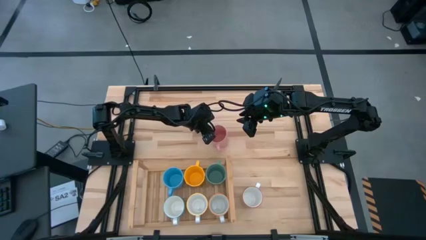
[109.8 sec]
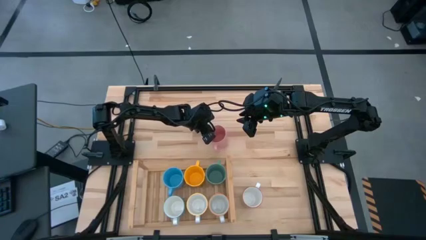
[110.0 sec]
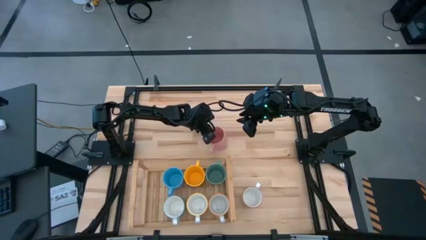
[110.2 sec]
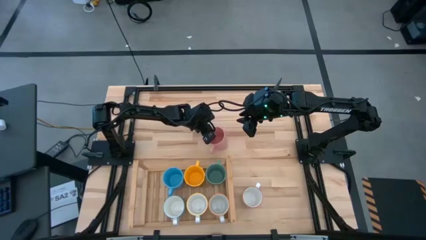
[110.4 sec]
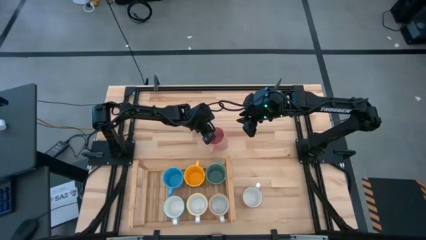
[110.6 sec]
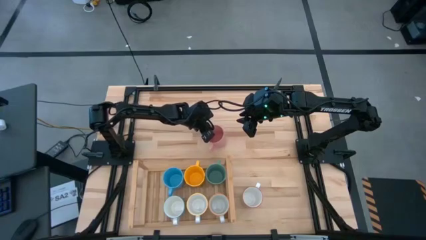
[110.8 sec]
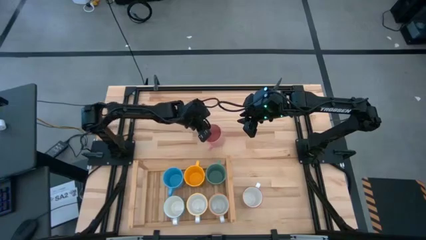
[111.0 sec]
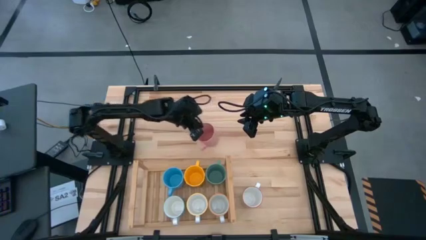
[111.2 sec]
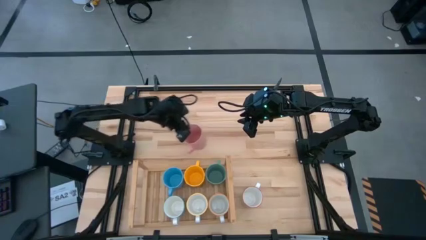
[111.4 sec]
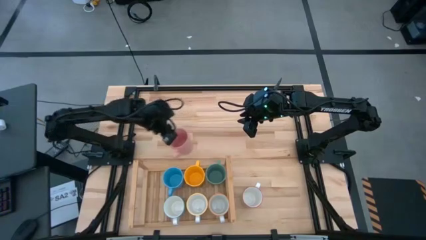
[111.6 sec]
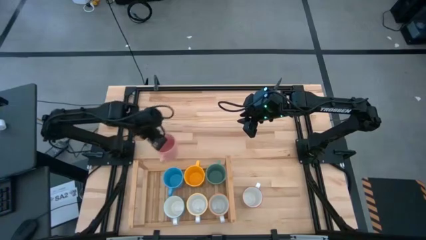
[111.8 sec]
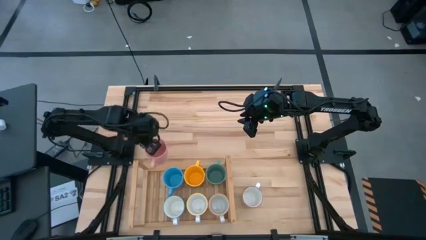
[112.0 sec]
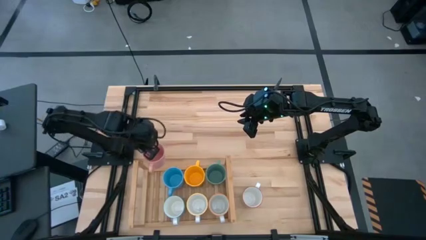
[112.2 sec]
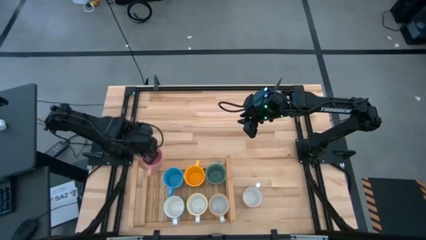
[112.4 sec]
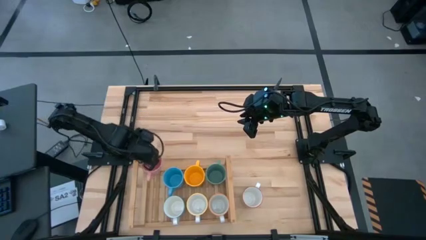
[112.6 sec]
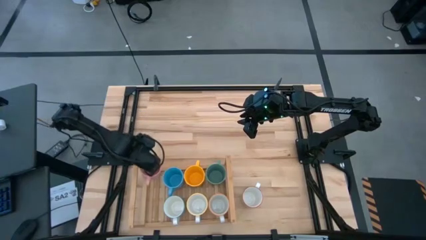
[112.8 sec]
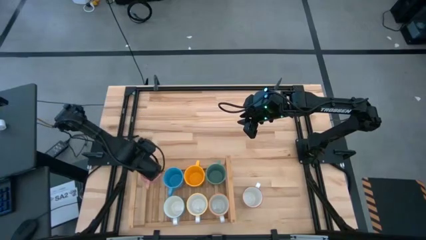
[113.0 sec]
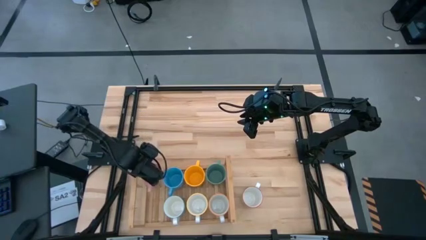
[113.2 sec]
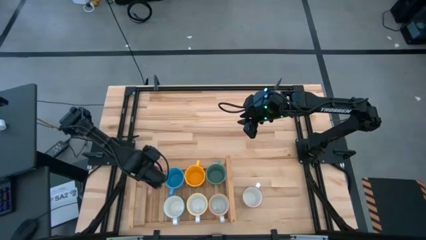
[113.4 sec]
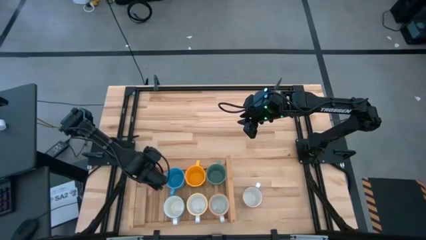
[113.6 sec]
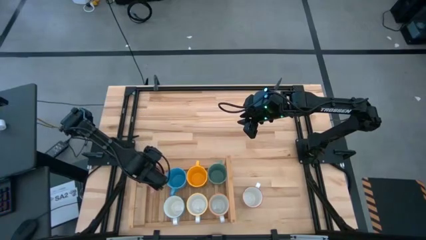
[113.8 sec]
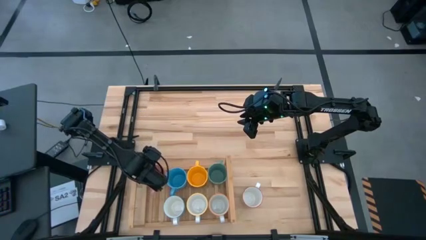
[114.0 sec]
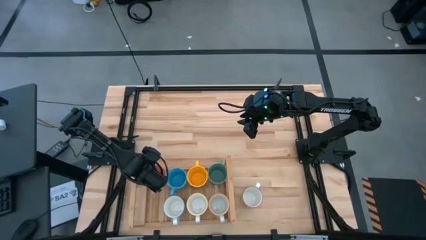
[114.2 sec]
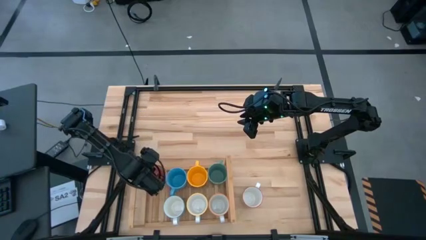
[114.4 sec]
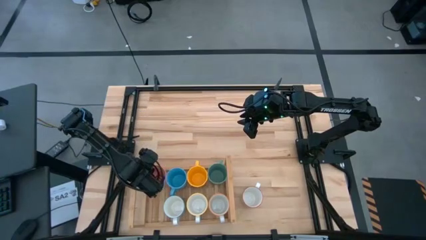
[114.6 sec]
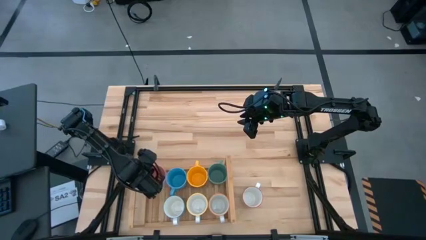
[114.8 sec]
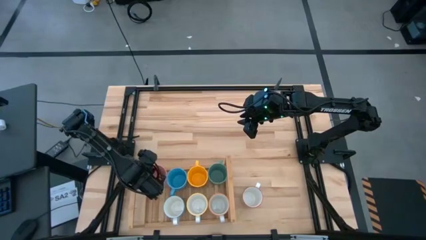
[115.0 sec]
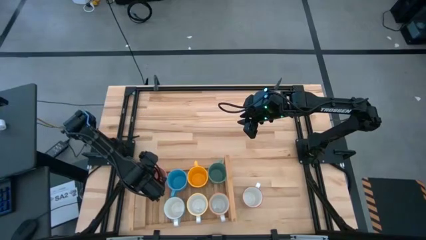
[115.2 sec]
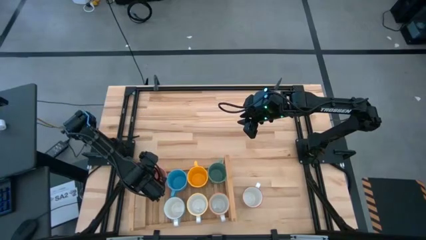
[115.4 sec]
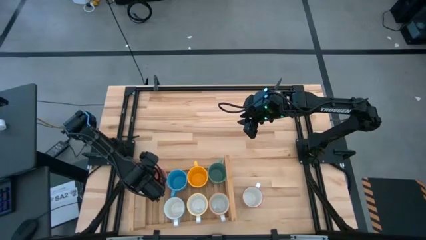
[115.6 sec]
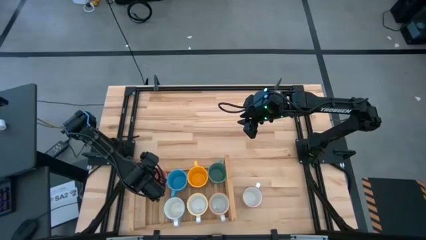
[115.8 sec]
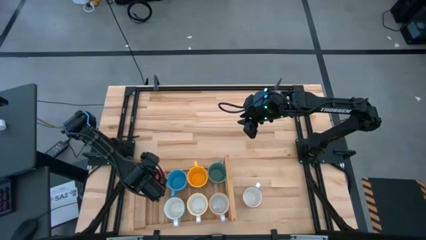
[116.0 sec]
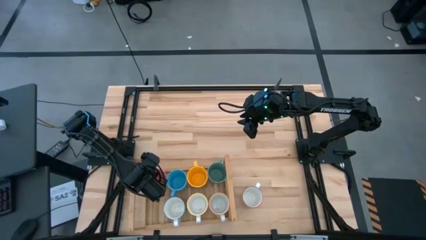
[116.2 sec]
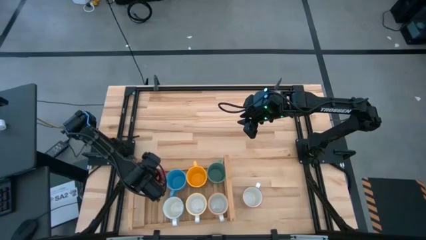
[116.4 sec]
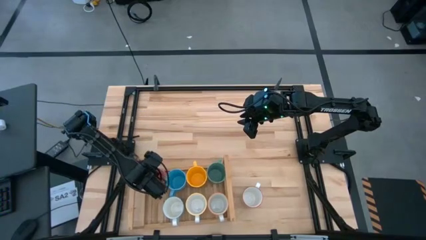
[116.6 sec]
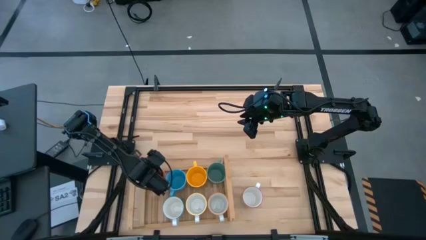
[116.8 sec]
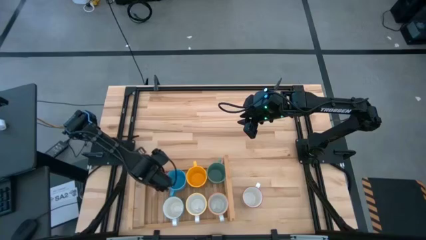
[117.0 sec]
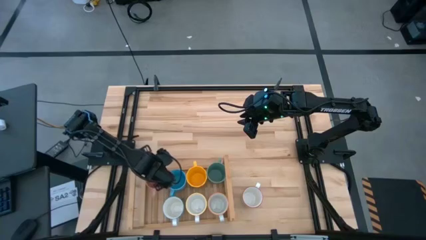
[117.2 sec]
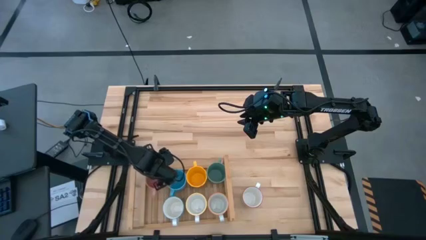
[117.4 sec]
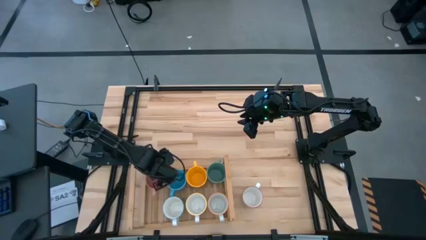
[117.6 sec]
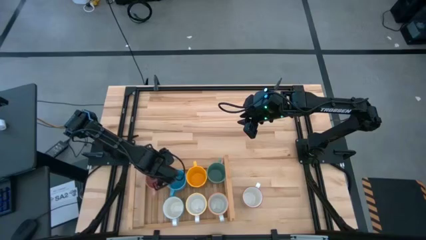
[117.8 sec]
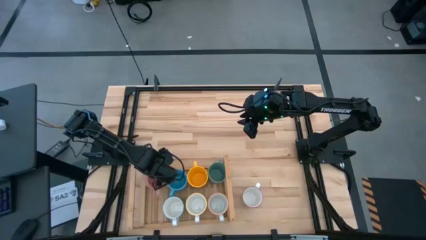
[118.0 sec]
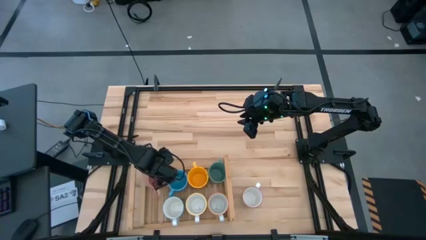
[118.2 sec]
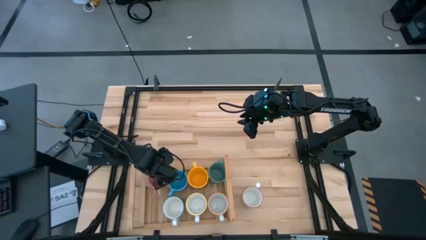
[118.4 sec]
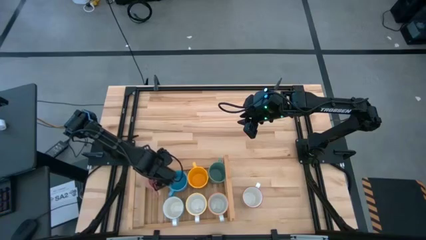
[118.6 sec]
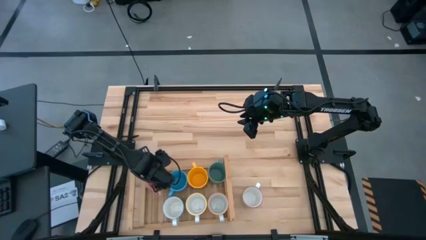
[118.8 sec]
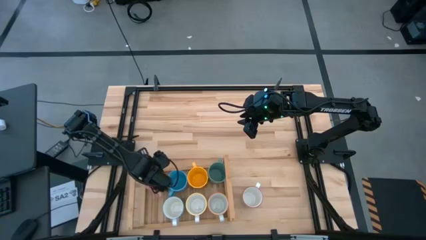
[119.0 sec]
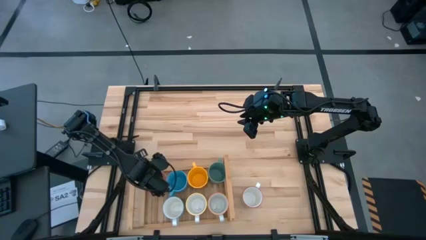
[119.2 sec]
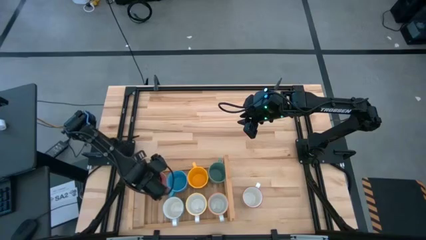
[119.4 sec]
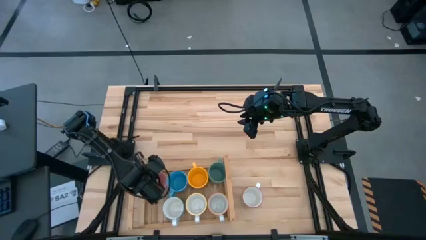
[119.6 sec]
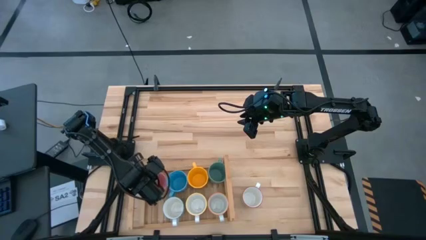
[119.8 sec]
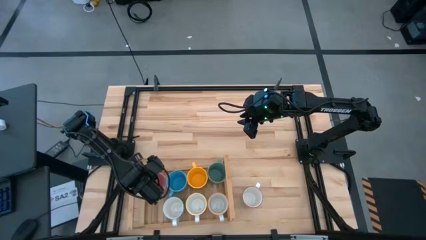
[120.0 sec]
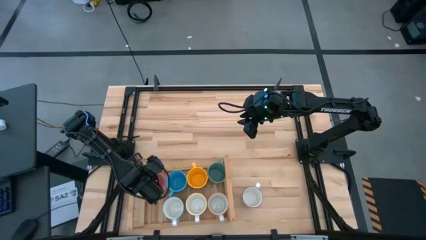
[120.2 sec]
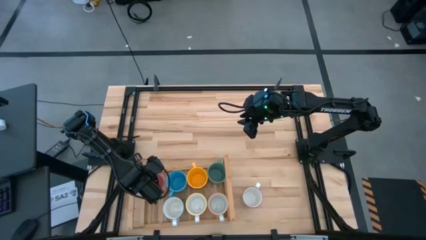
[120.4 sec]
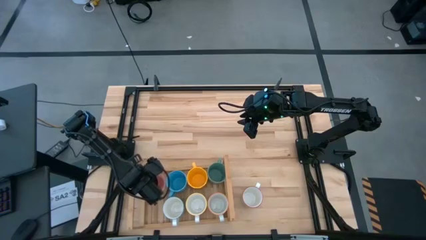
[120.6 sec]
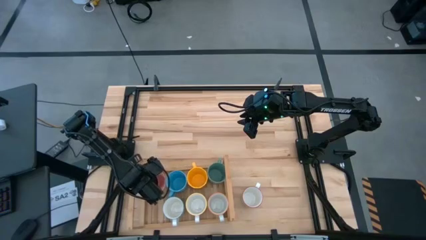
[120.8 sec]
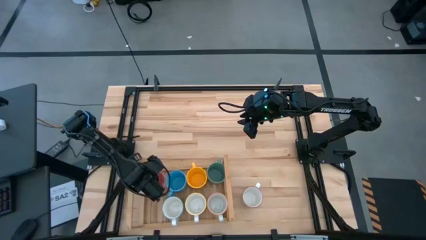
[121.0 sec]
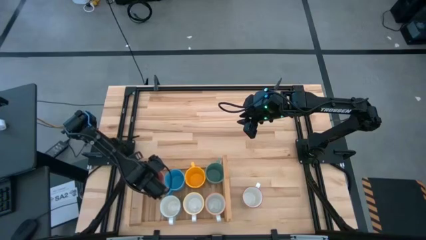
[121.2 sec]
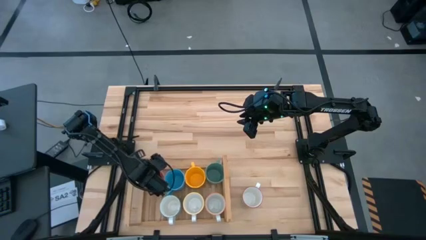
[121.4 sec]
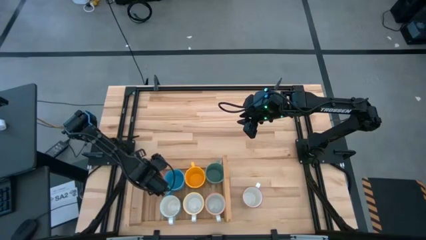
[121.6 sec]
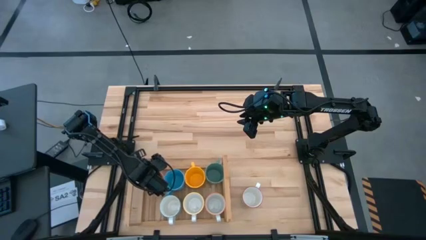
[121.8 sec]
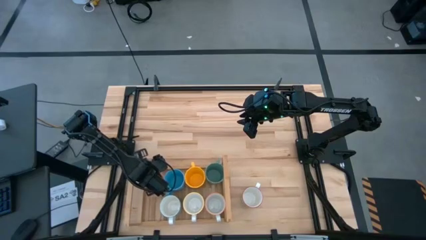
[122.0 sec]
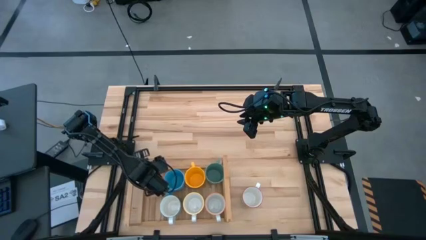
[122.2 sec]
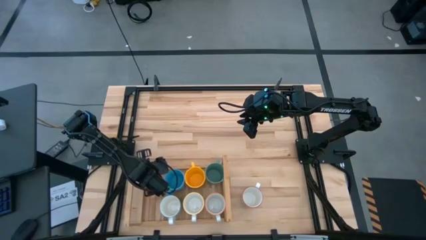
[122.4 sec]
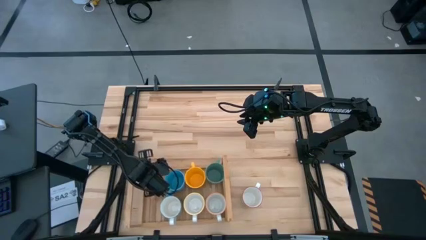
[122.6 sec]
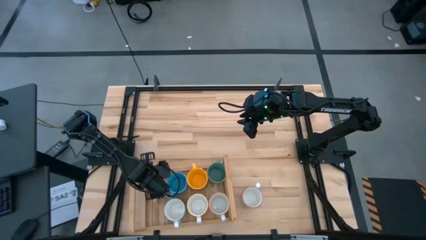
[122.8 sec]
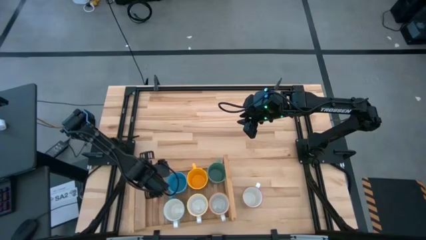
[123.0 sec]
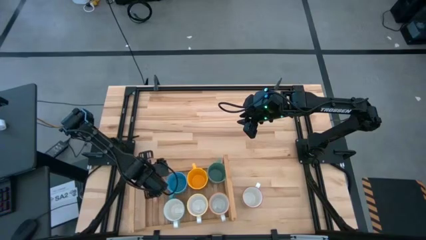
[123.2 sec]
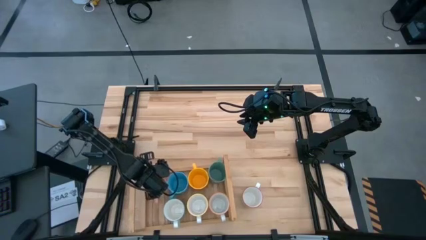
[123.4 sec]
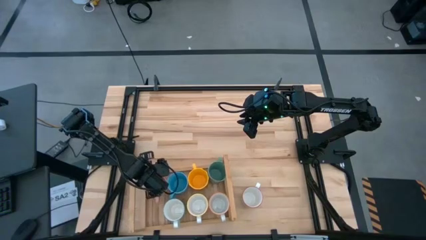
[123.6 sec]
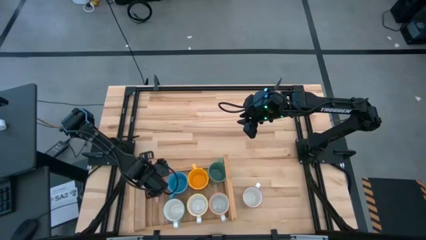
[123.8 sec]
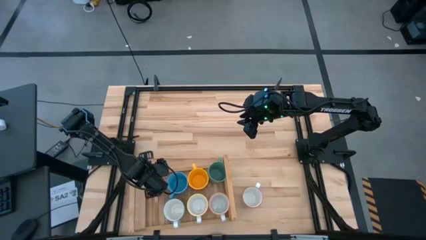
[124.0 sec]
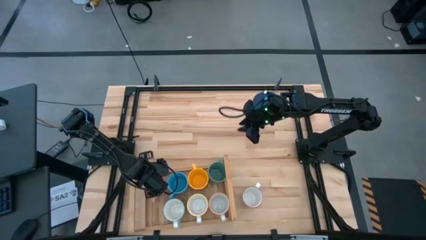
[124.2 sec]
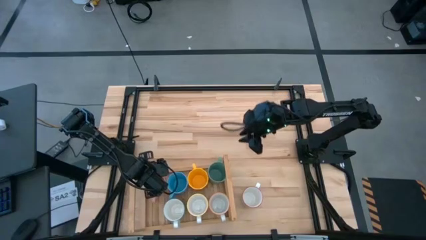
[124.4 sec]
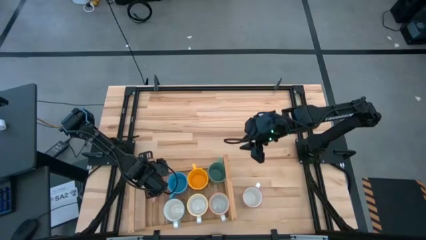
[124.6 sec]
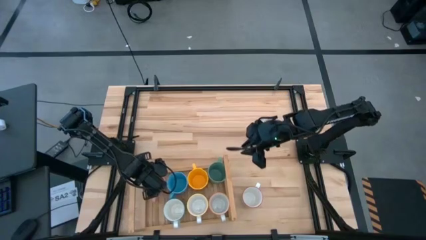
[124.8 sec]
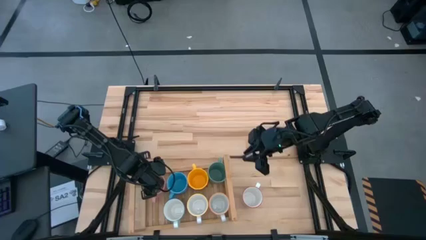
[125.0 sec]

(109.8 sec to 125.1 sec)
Task: Place coffee mugs
Put the pink mug on the shelf
